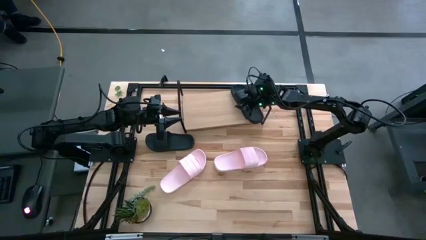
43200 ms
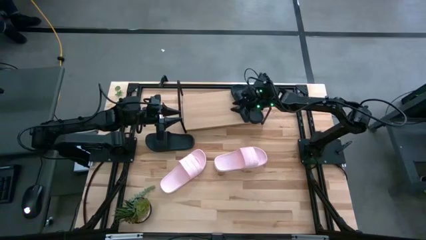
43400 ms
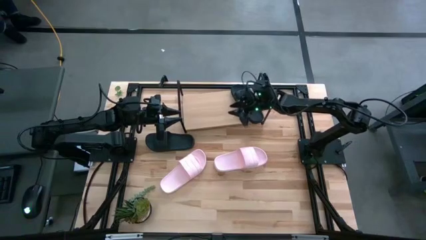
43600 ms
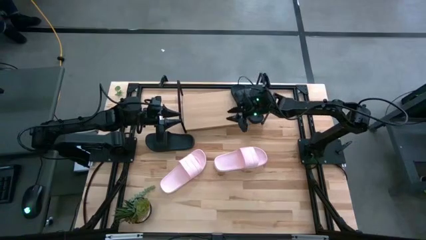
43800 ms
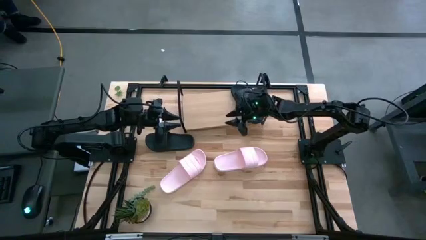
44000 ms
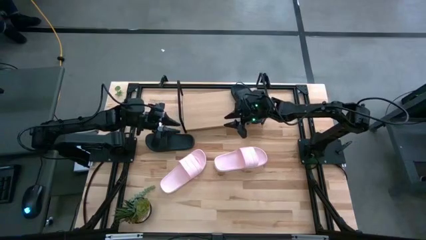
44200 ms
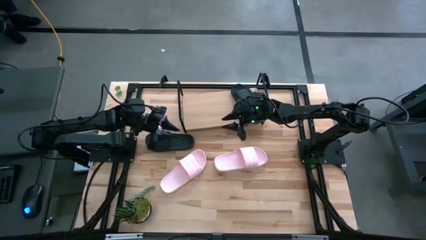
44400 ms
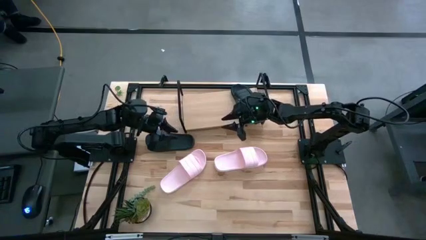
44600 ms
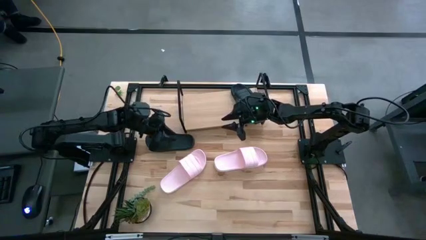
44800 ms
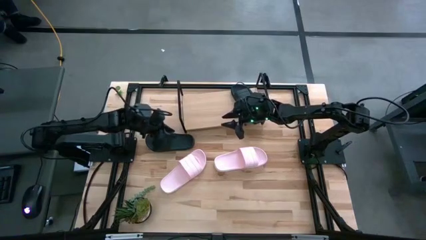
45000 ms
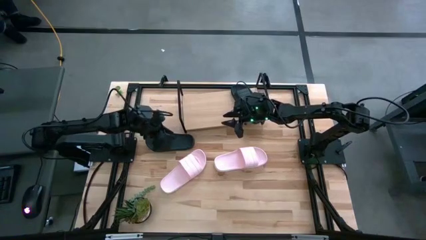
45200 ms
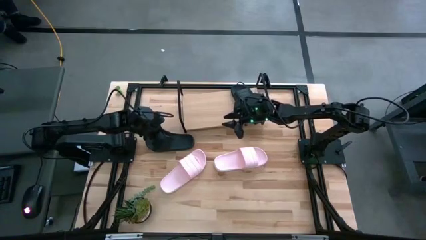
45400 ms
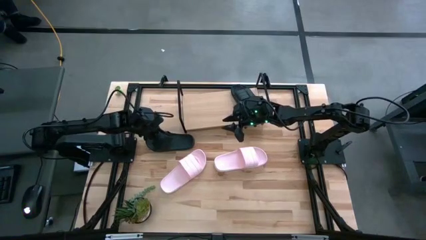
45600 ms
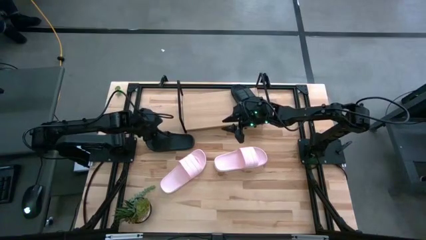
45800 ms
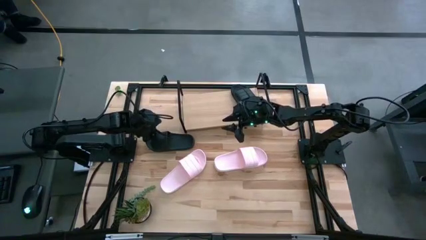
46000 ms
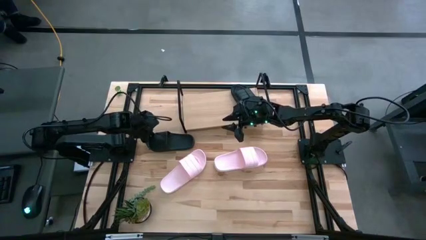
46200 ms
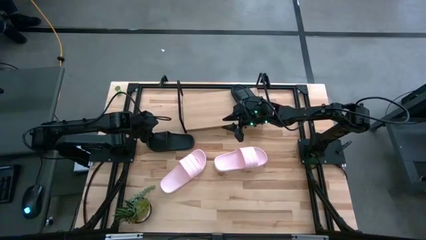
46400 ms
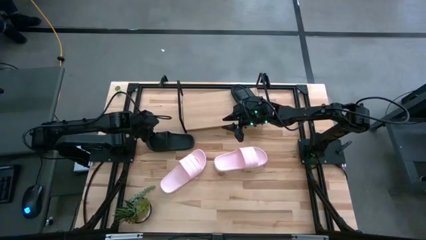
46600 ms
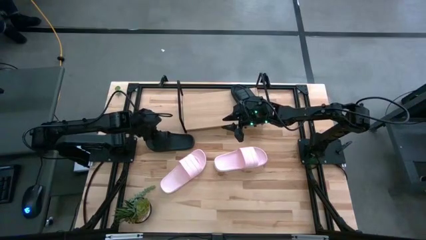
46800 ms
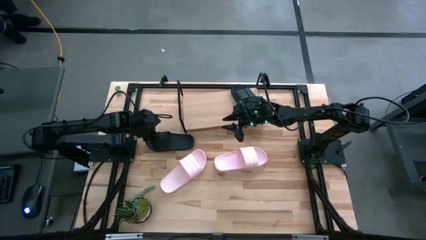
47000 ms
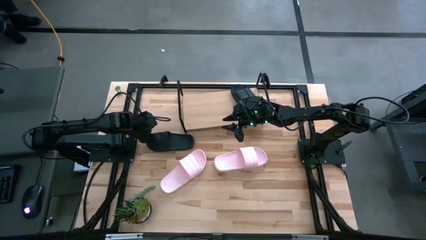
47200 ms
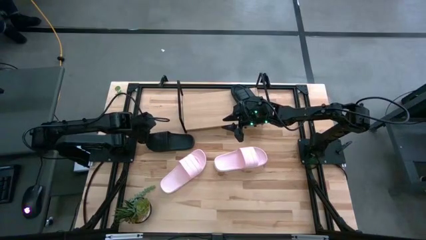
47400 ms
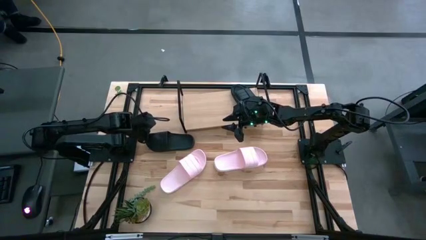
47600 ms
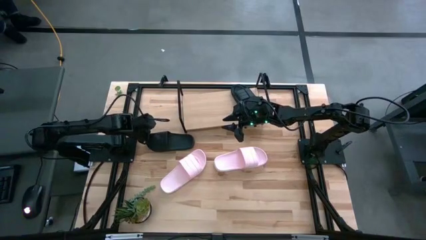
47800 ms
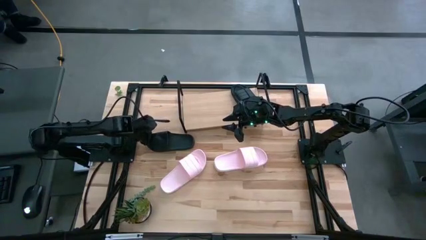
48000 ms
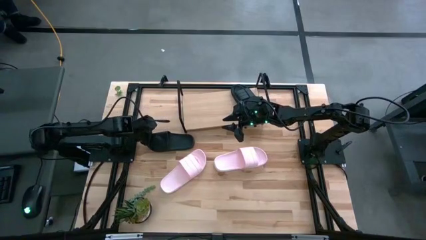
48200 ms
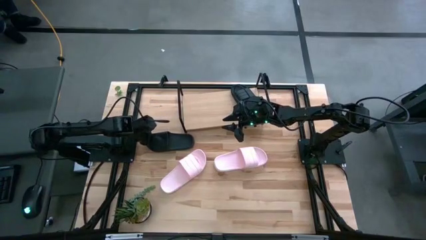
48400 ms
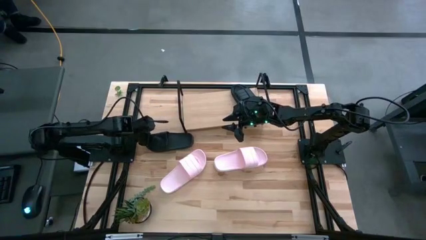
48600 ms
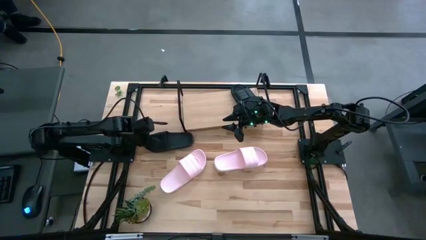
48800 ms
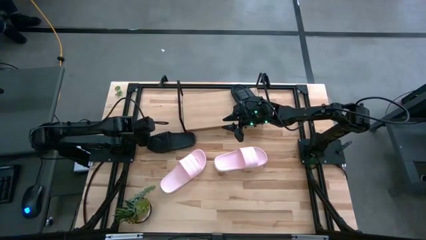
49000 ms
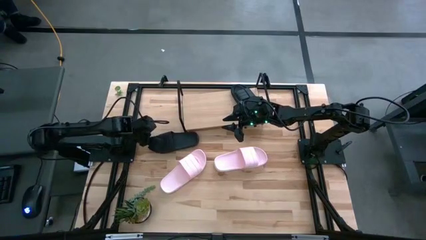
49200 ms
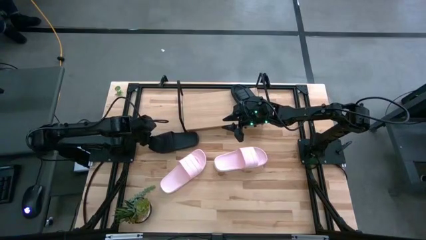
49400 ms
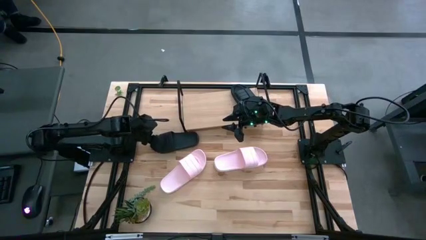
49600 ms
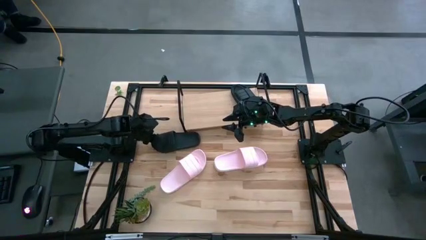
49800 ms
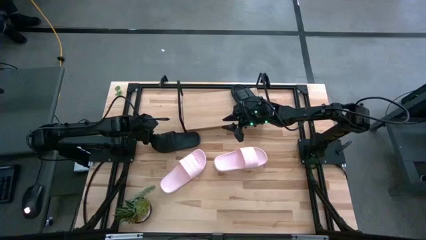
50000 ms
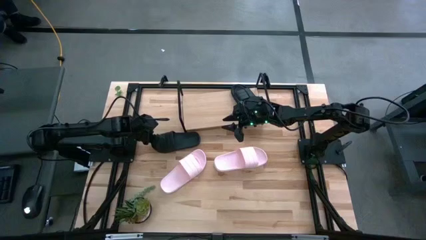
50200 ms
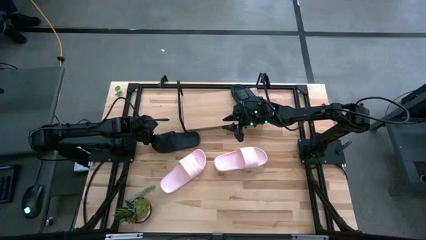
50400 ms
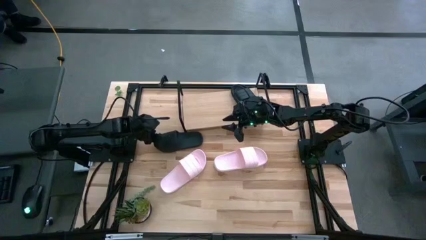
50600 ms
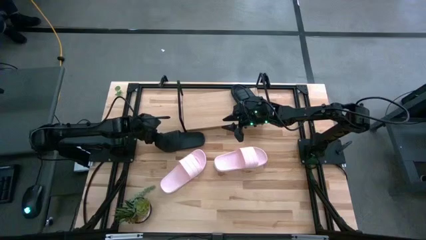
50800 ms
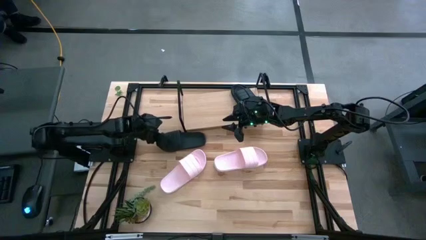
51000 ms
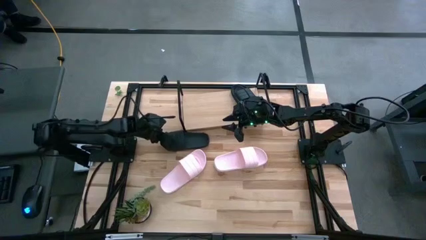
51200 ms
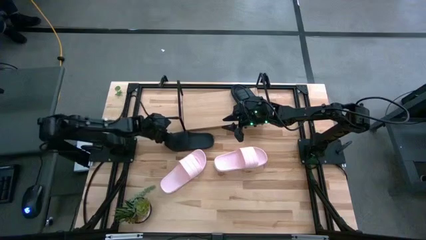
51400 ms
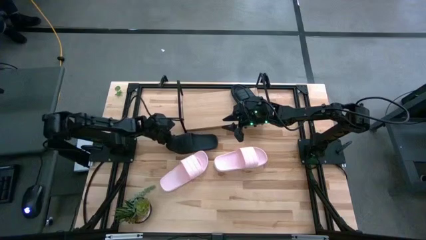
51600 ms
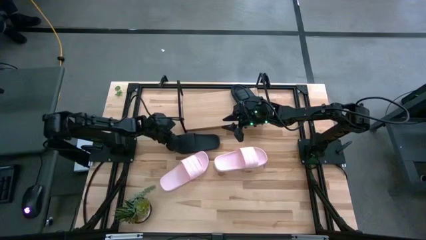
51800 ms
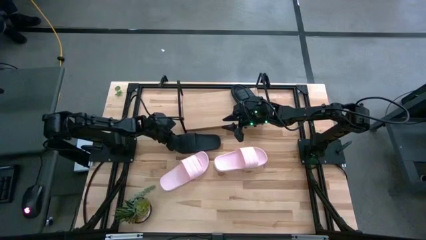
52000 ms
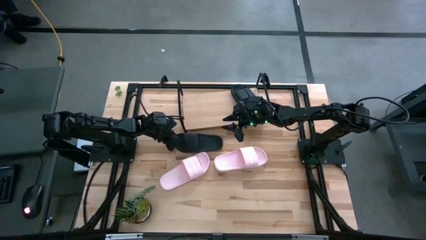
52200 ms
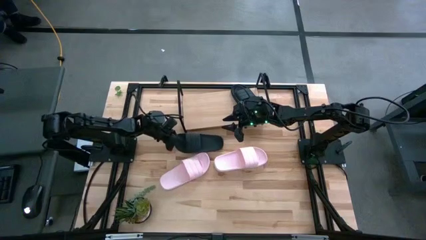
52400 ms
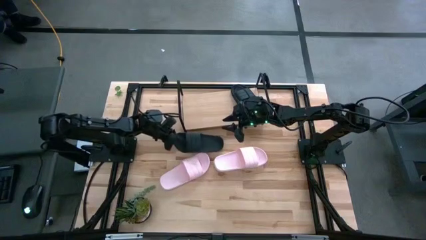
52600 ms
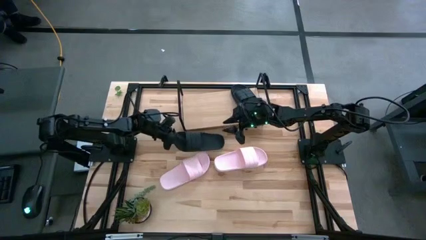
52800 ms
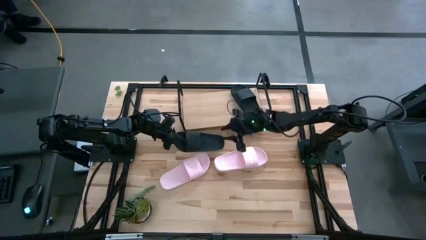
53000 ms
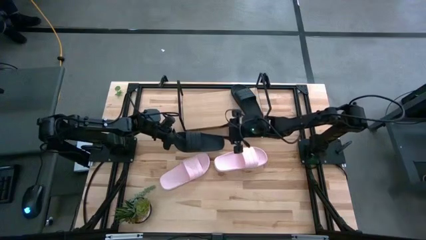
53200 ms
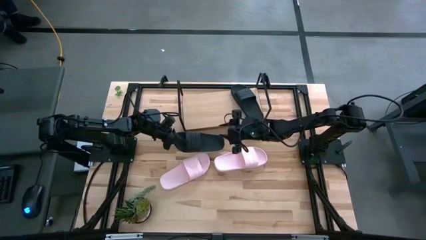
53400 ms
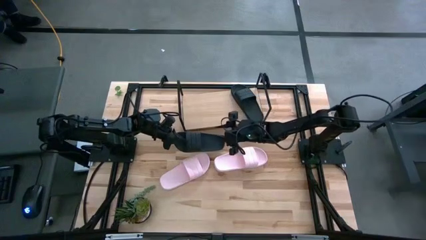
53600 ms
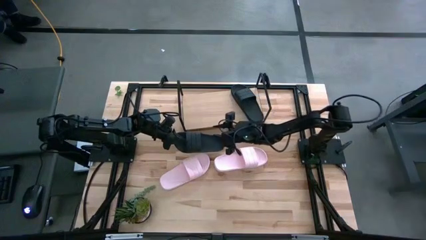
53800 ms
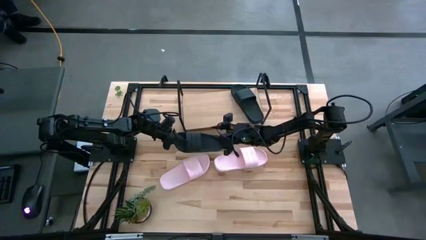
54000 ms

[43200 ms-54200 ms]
Task: Pick and place slides into the shelf
Put the black slide on the shelf
